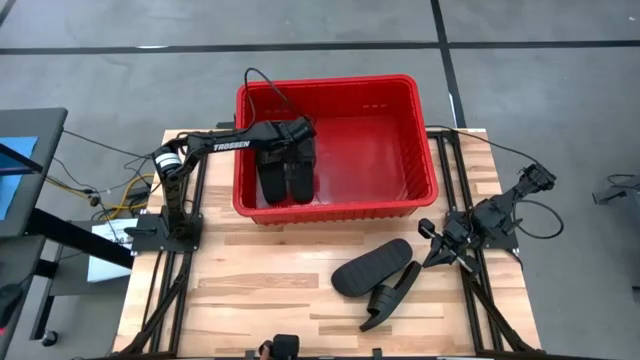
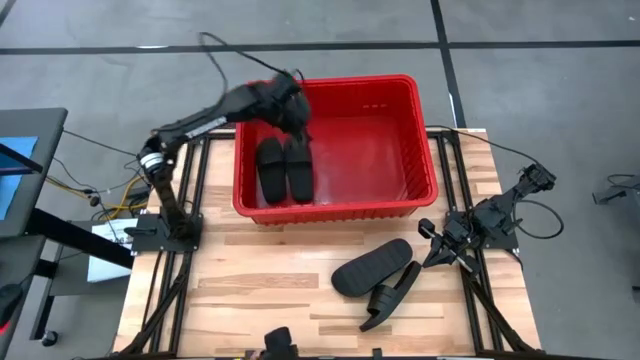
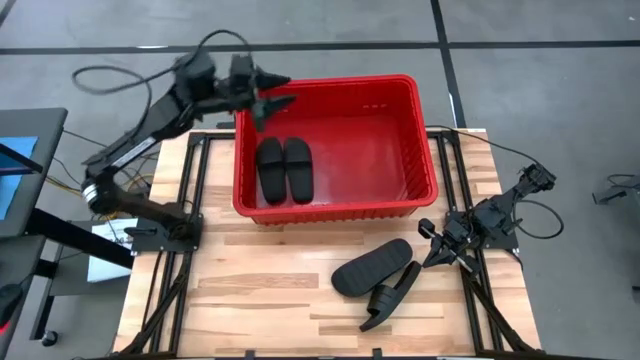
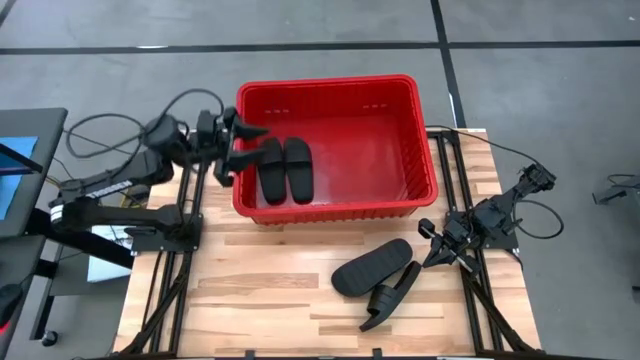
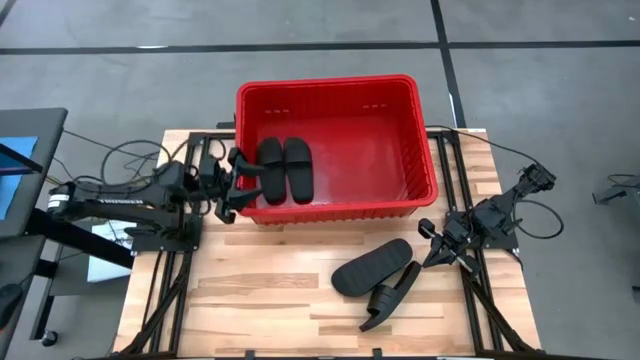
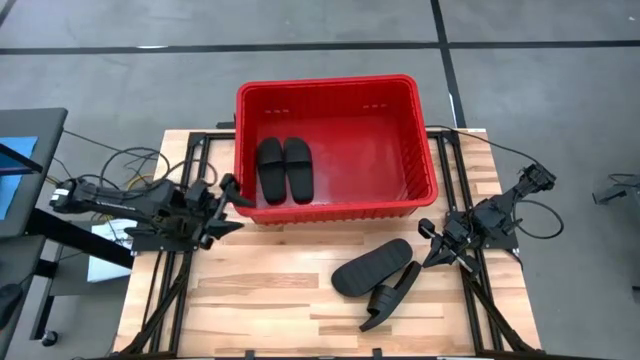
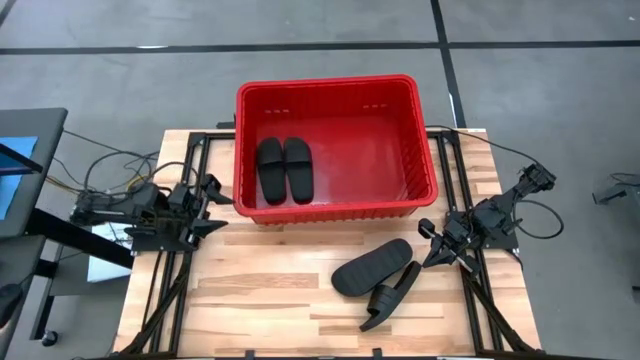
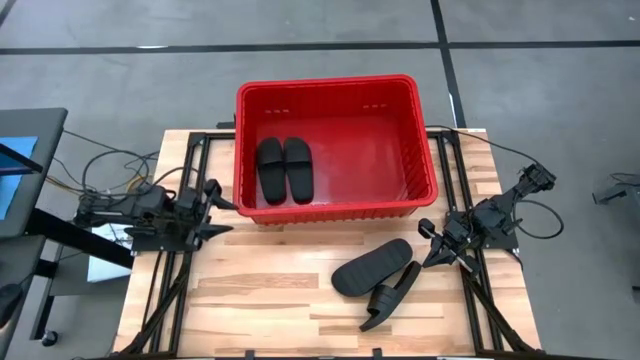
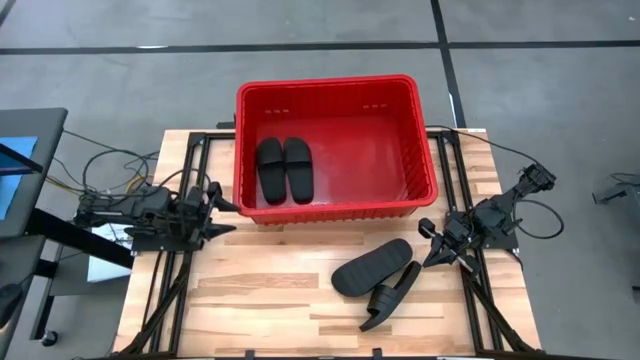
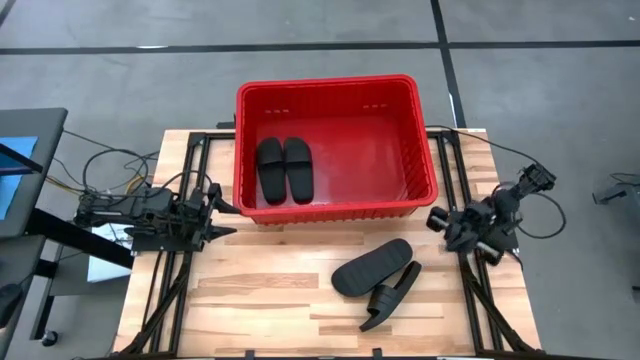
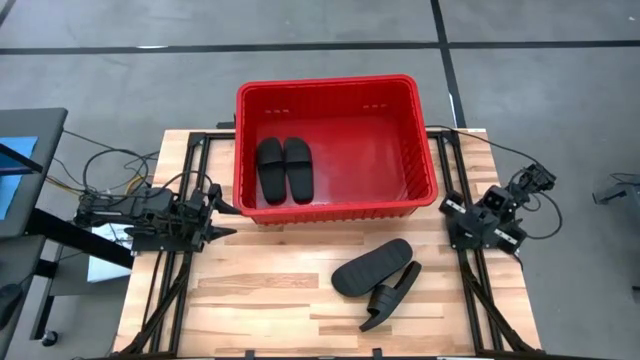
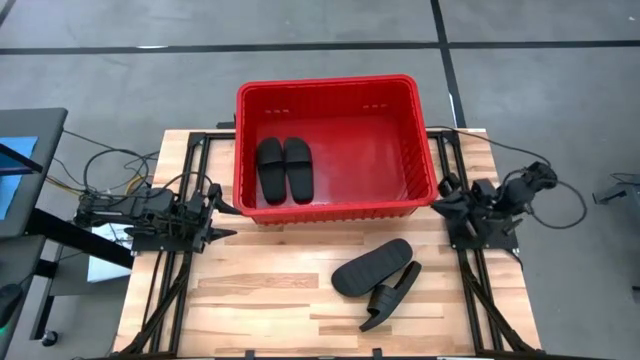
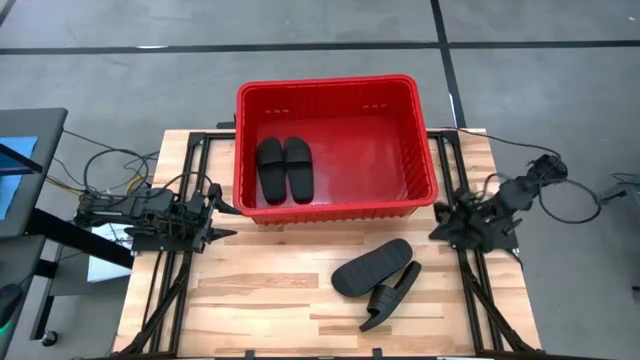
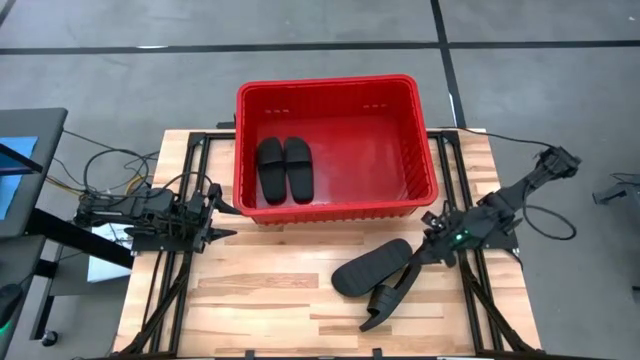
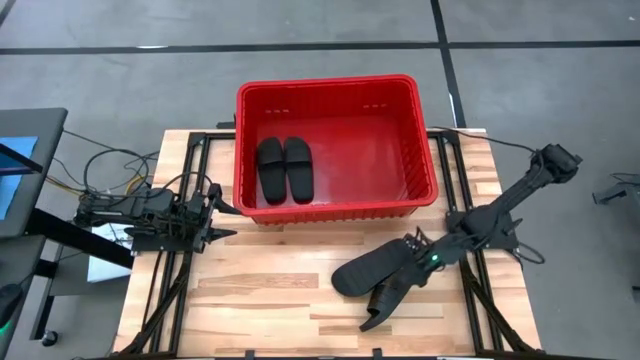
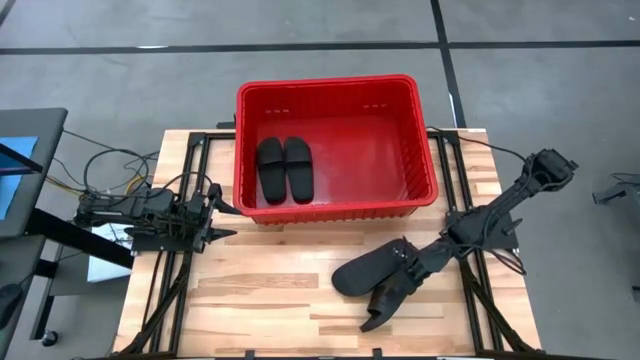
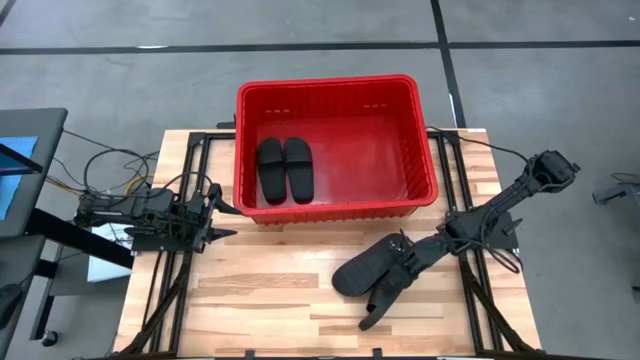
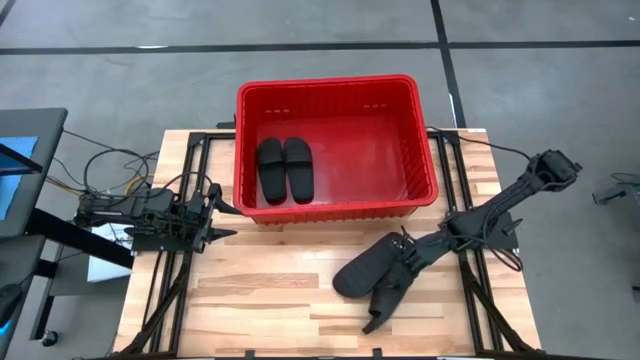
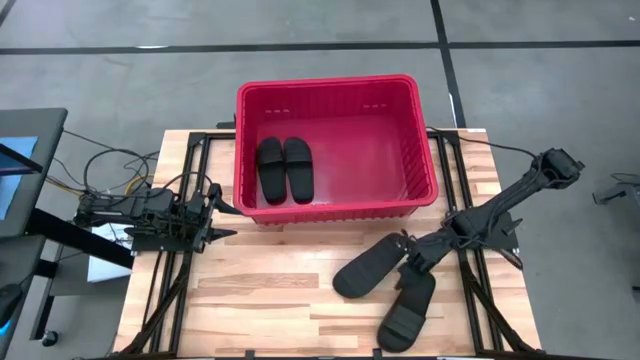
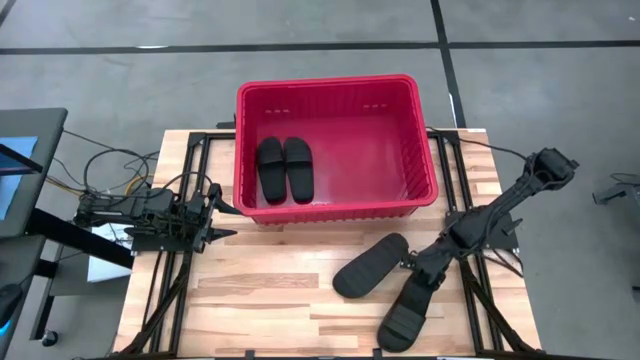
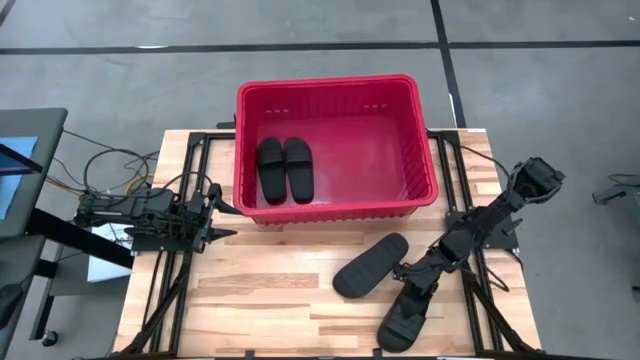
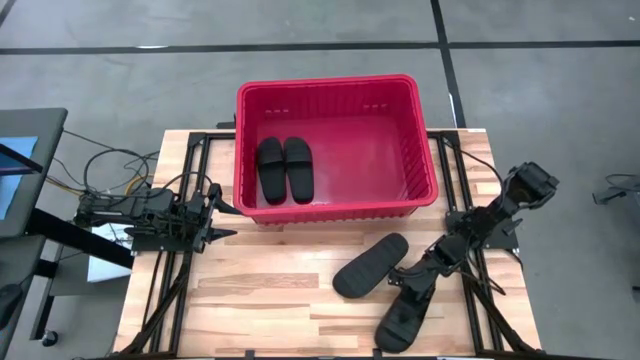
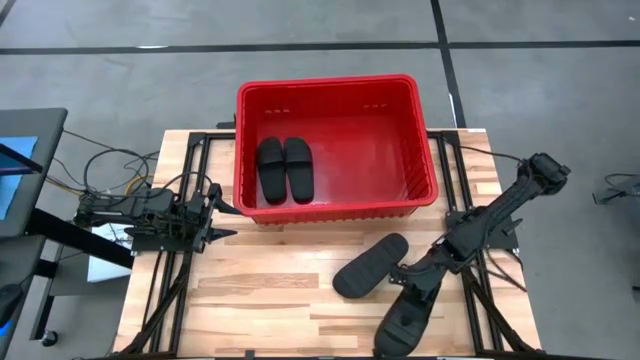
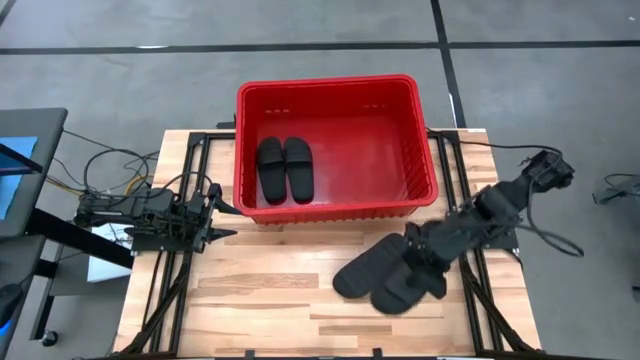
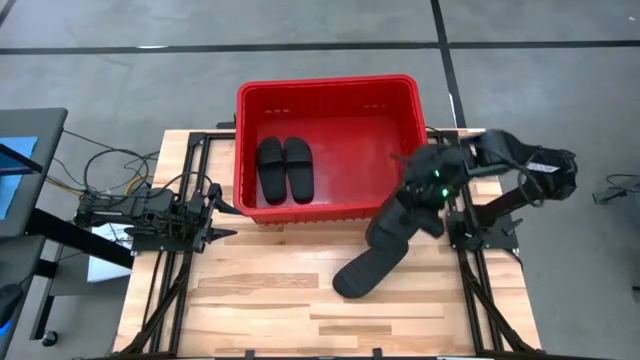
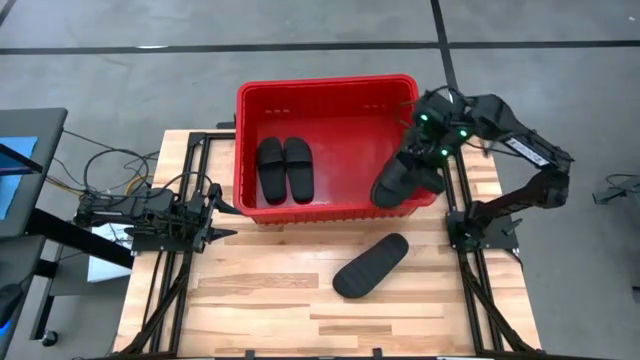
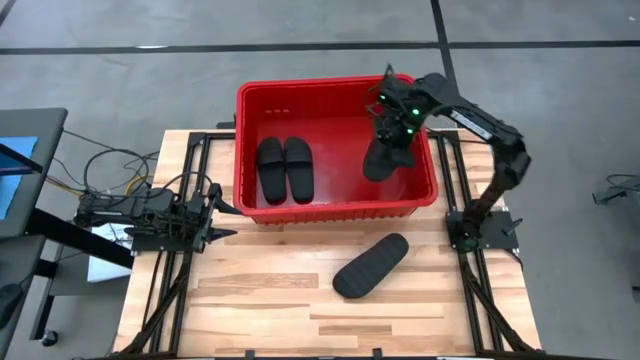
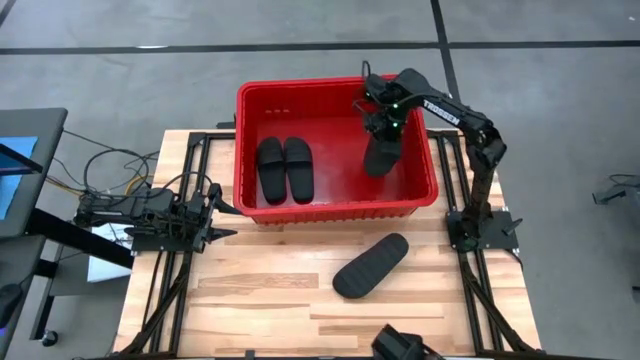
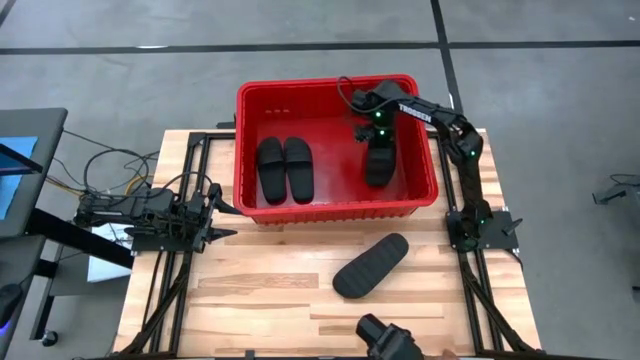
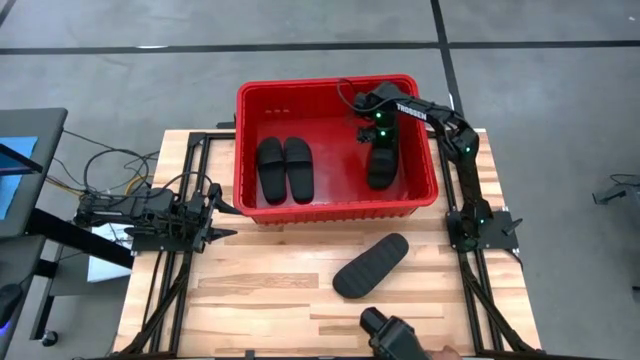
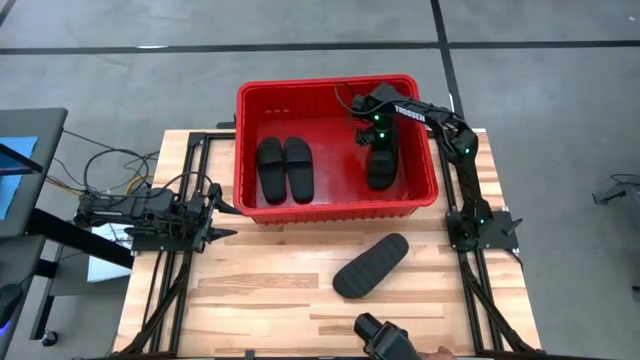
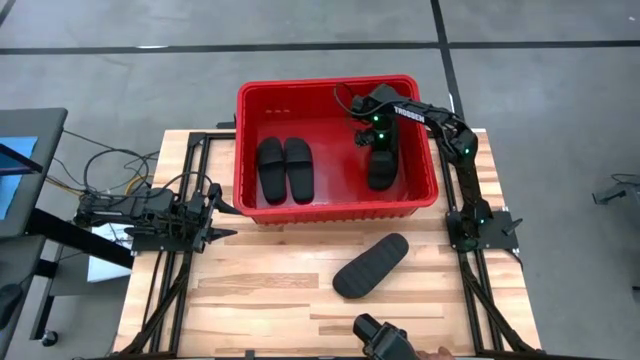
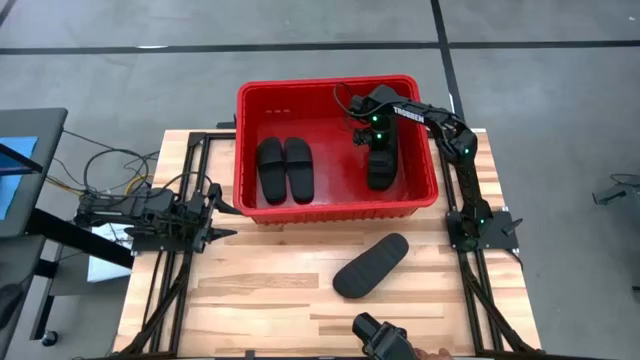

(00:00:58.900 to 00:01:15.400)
Task: Pick and place slides into bin
Put the black slides into the red bin

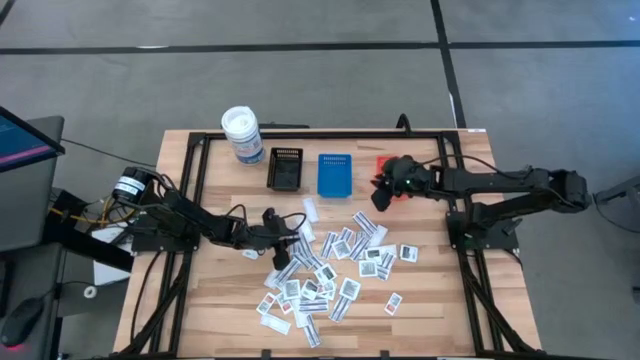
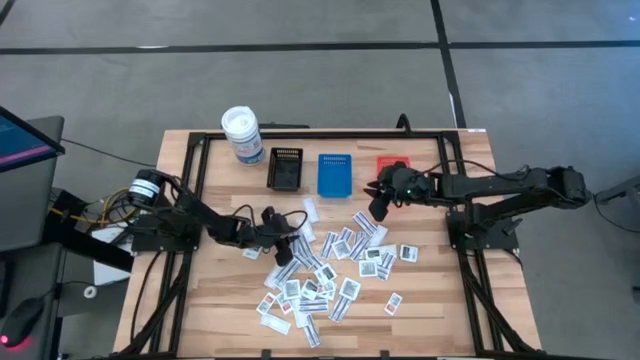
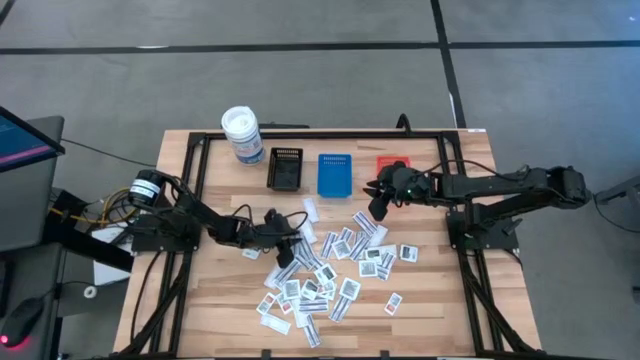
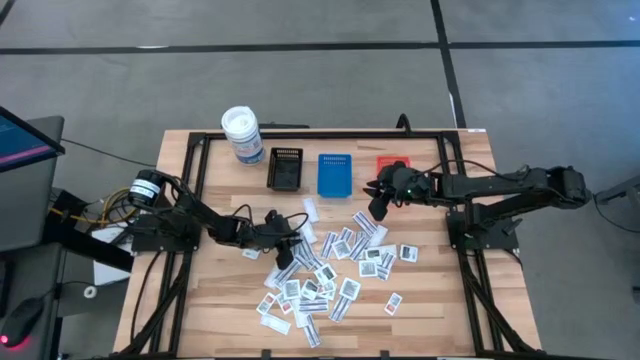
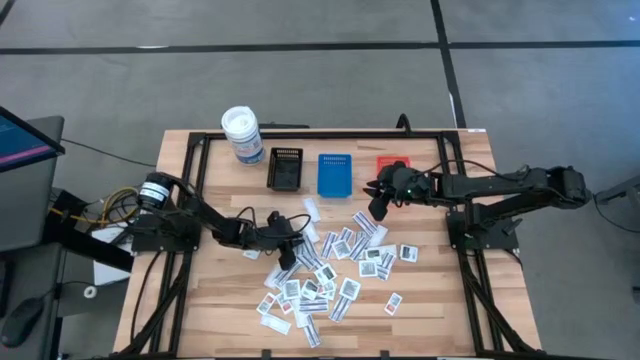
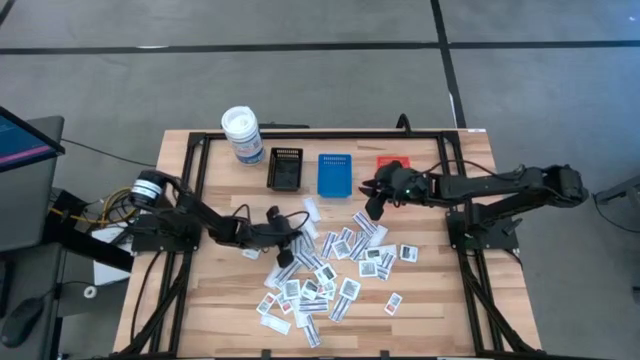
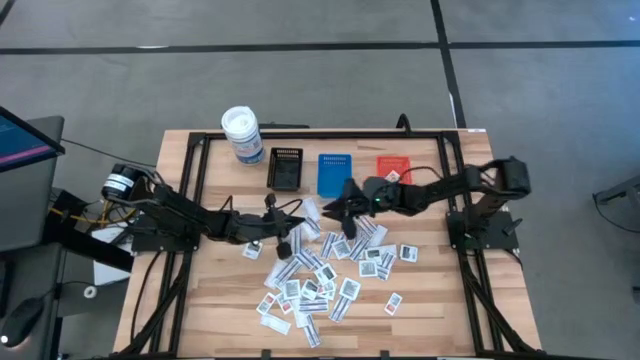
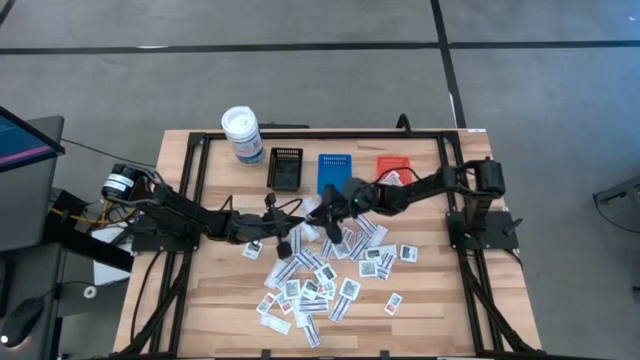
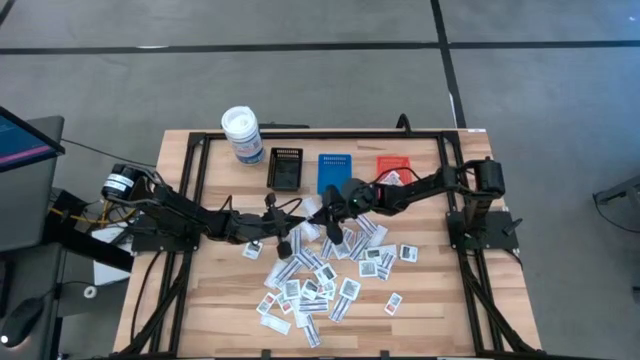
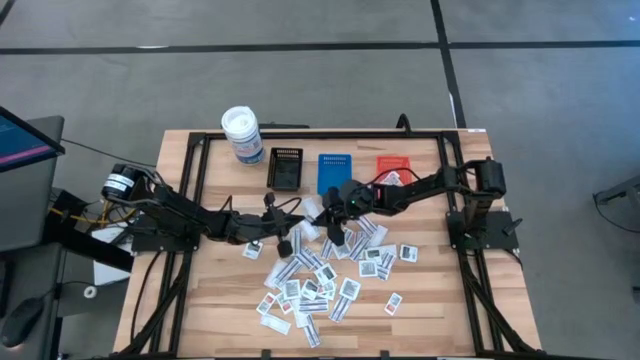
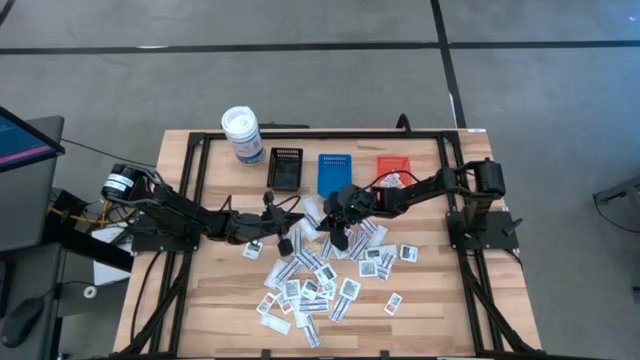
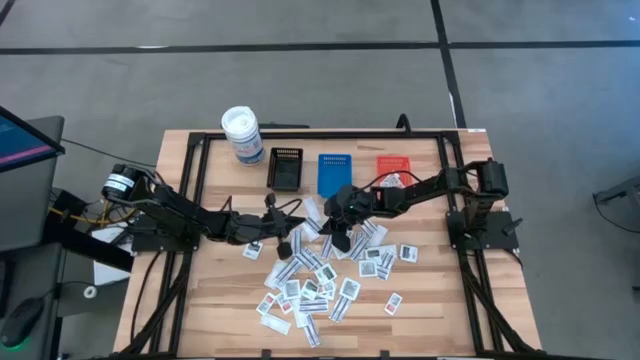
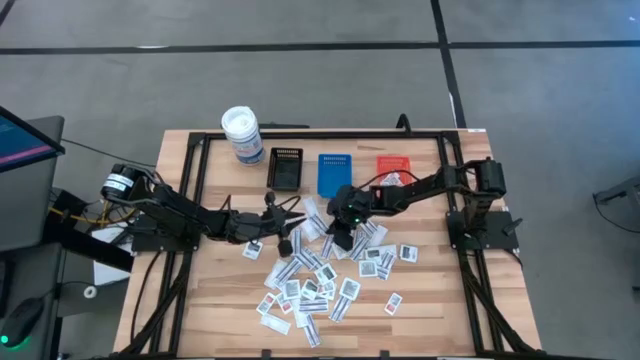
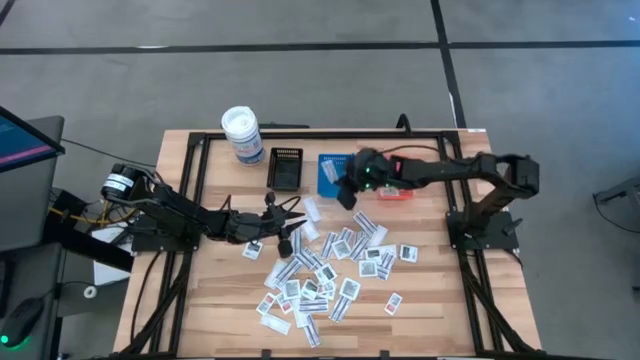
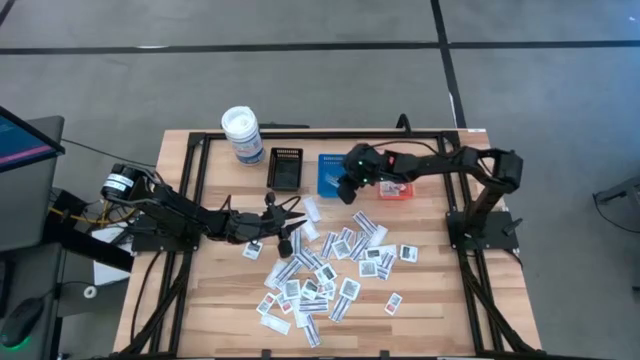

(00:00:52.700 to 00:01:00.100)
Task: Pick & Place First Aid Supplies
Put the blue bandage into the blue bin
